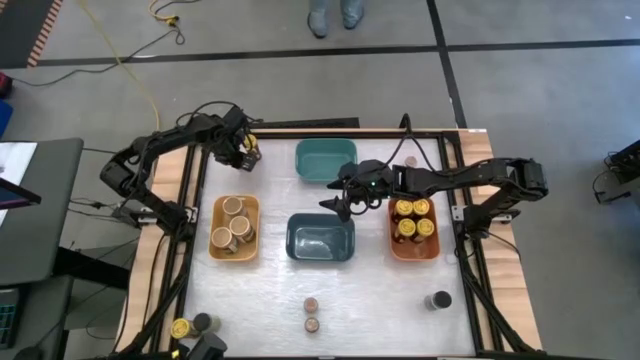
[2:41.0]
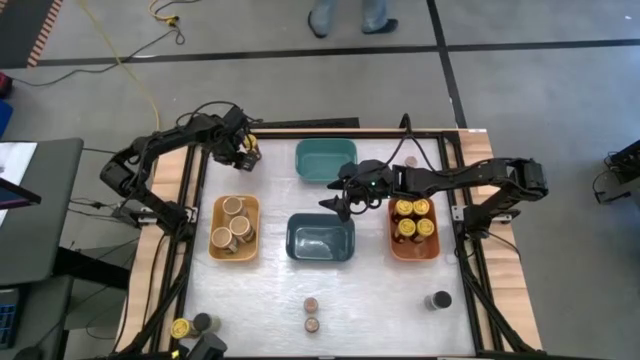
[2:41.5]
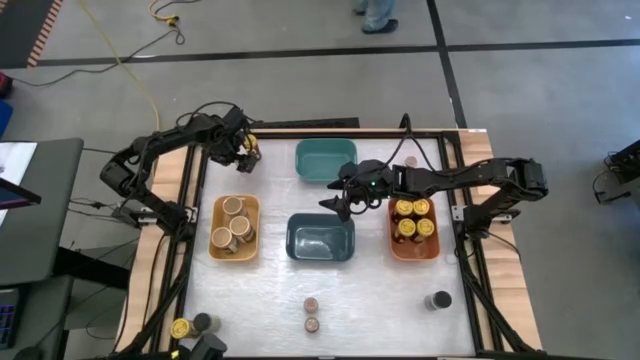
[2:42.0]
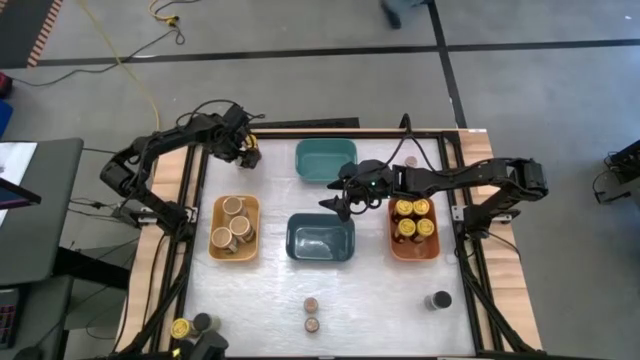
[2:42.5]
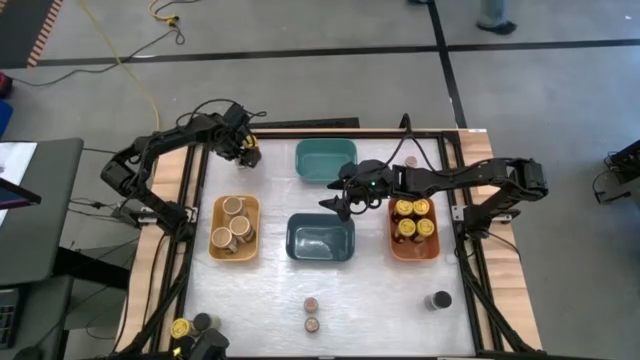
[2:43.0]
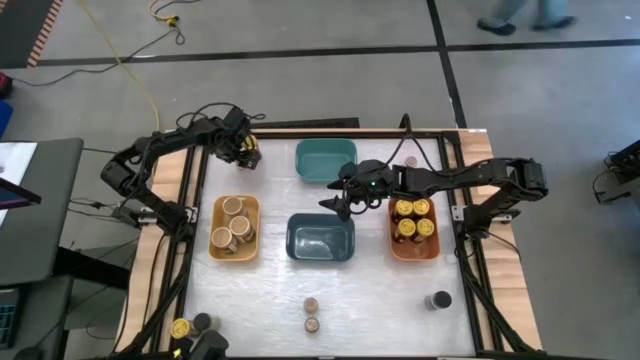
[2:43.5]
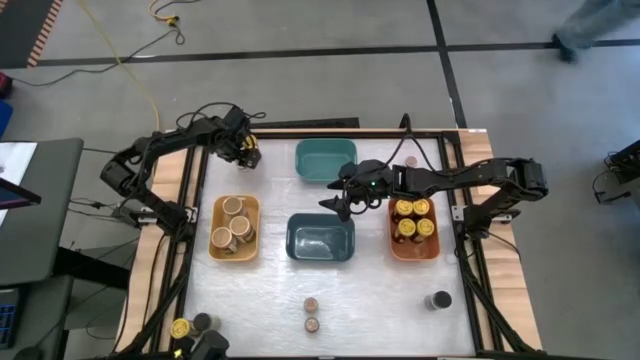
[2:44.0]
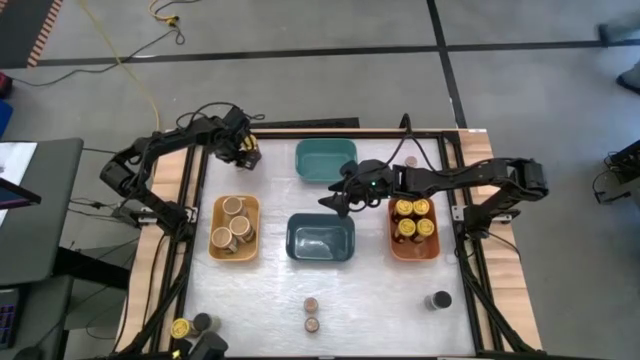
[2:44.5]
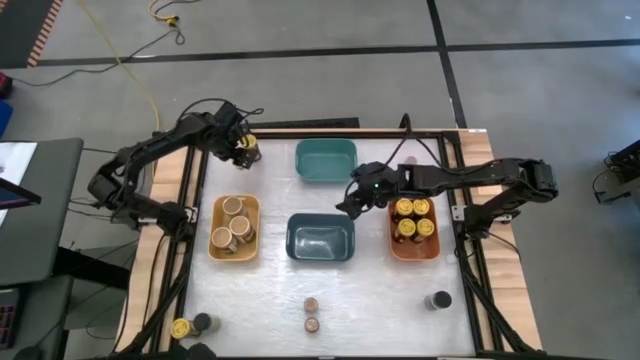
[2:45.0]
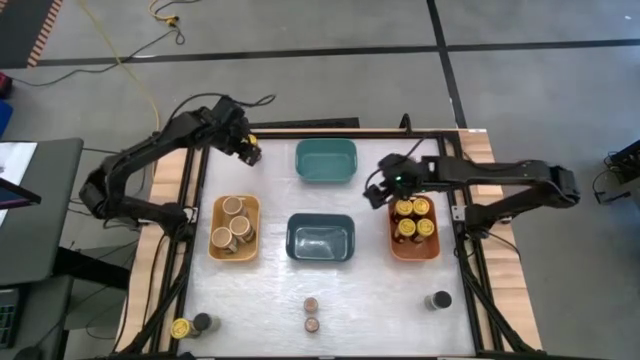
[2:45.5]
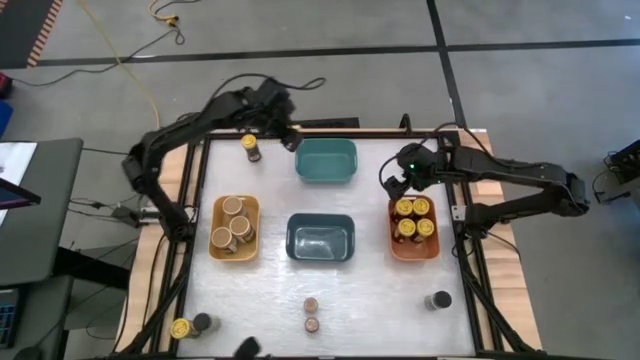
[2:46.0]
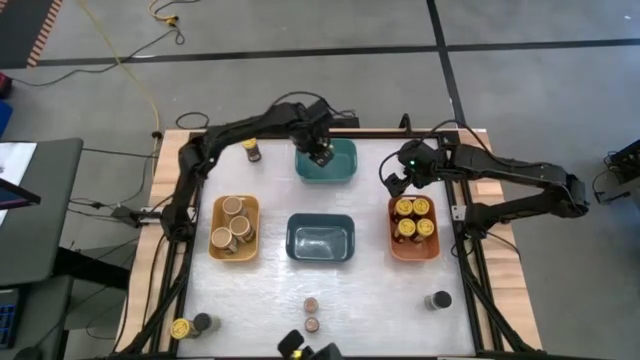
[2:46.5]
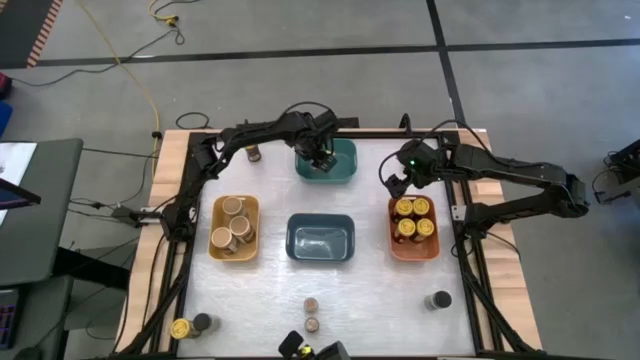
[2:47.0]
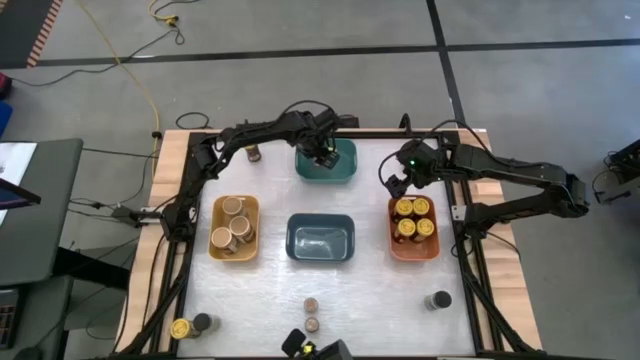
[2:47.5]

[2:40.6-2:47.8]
Task: Sort spices by type
Put the brown seasoning bottle into the green bin

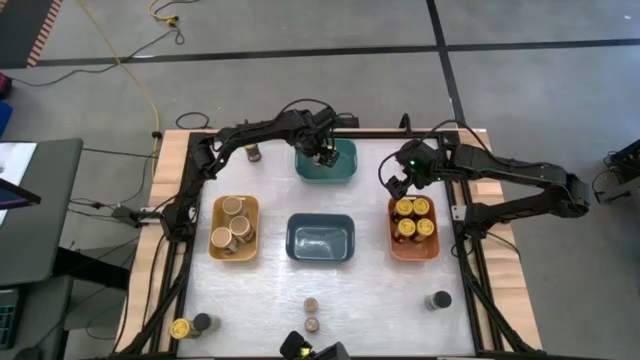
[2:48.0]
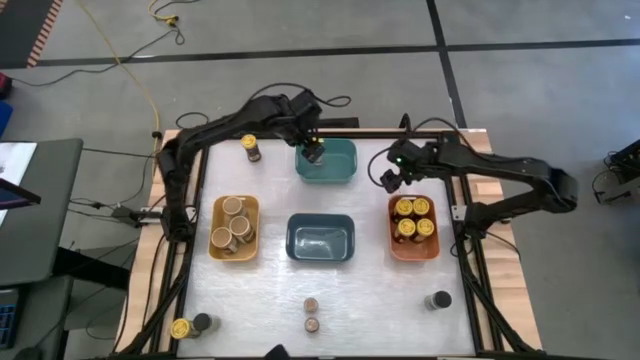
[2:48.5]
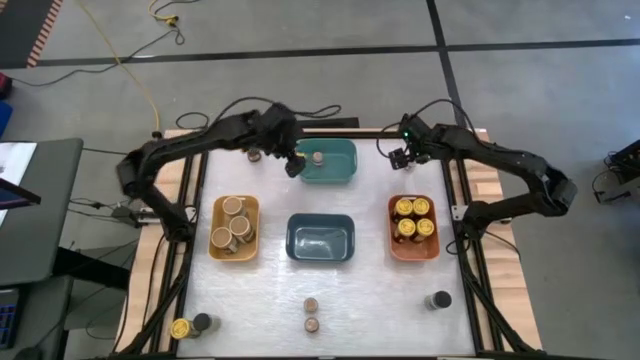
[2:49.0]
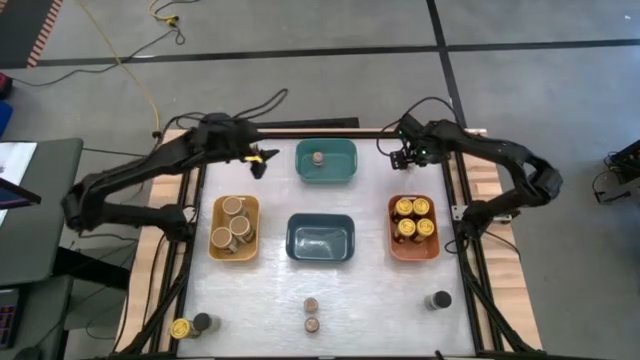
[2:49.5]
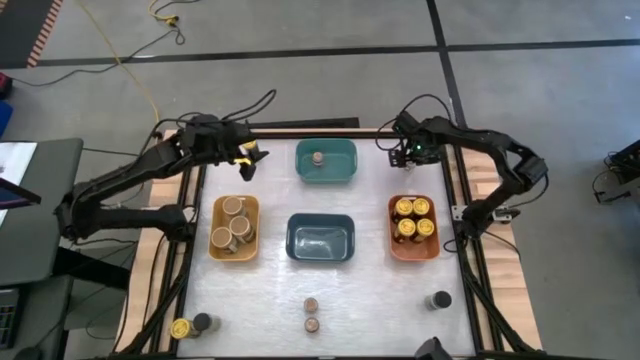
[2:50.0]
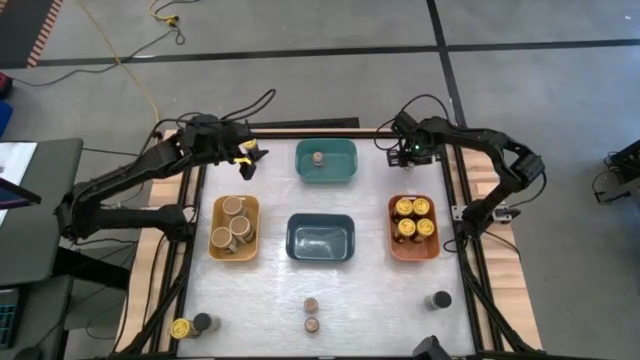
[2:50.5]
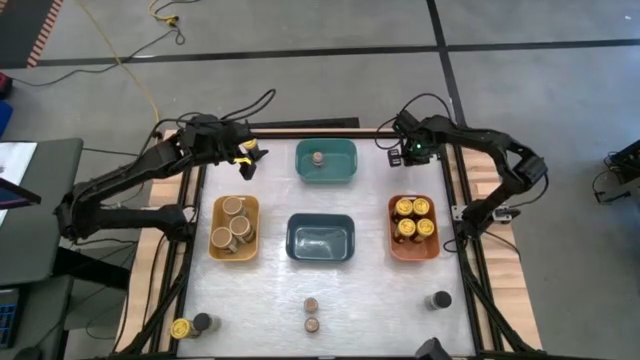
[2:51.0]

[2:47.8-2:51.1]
Put the brown seasoning bottle into the green bin

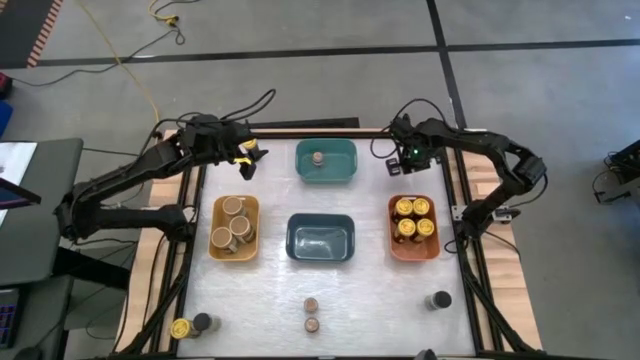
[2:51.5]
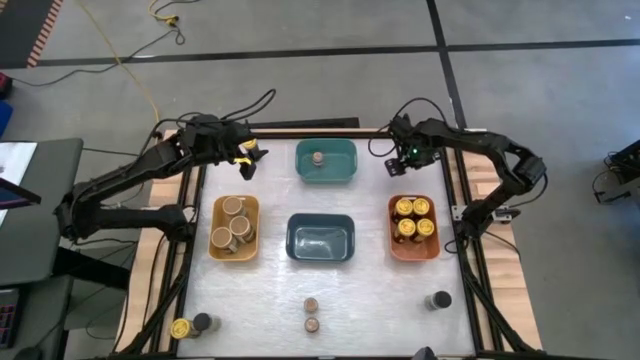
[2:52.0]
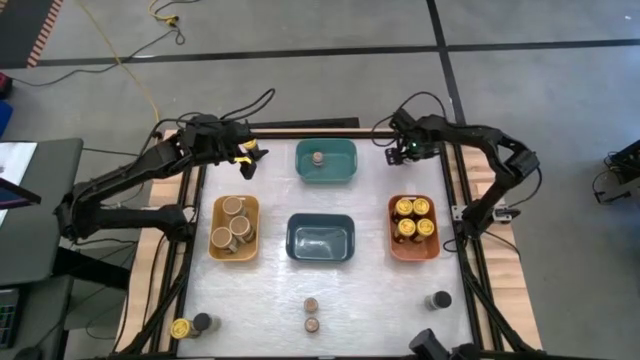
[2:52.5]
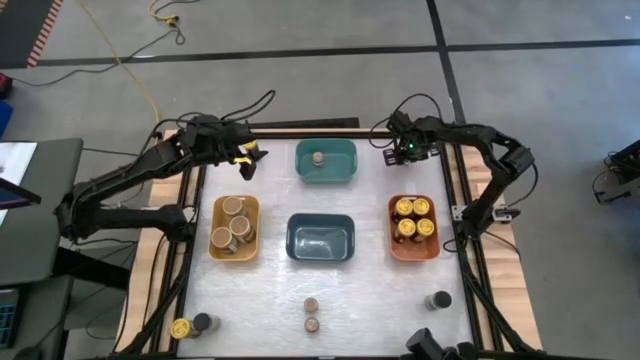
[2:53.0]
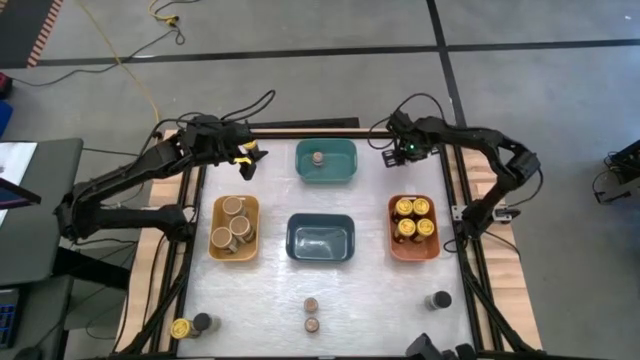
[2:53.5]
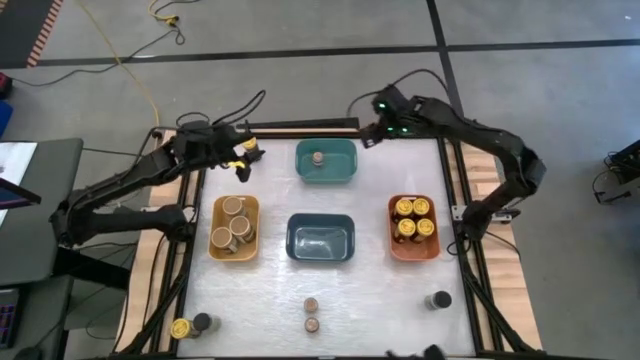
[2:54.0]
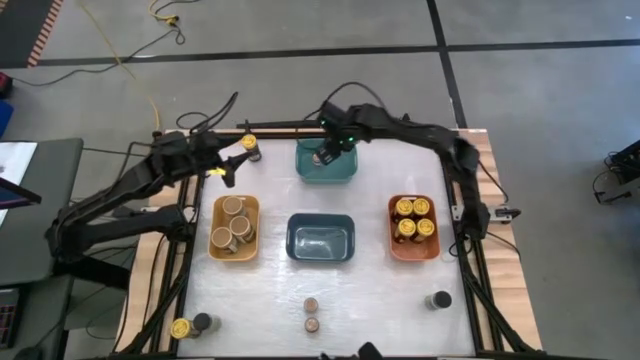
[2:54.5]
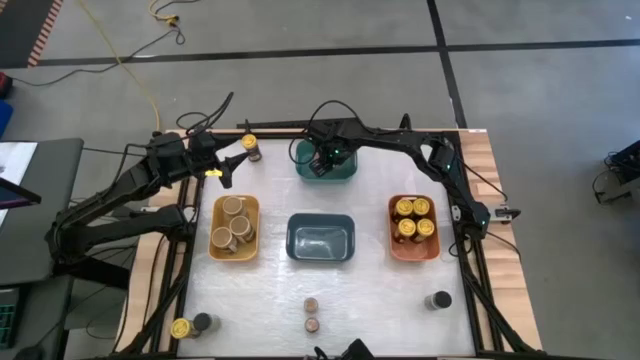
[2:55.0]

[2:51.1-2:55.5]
Put the brown seasoning bottle into the green bin

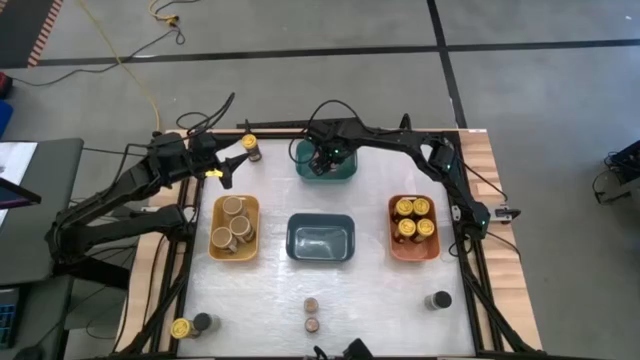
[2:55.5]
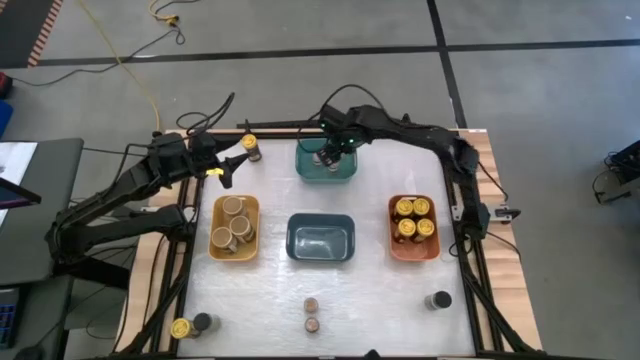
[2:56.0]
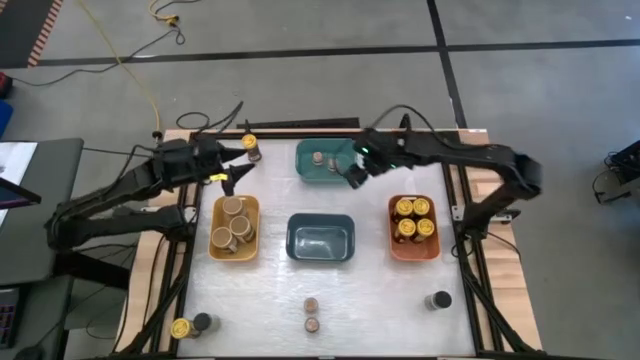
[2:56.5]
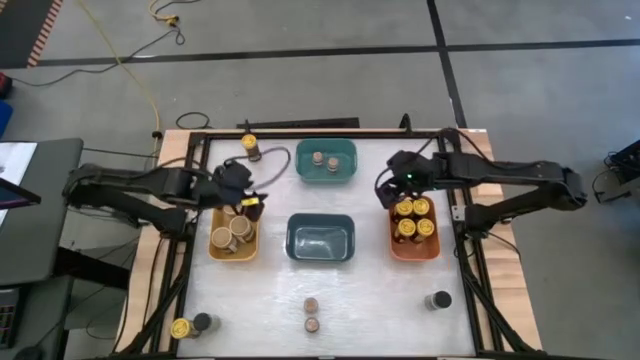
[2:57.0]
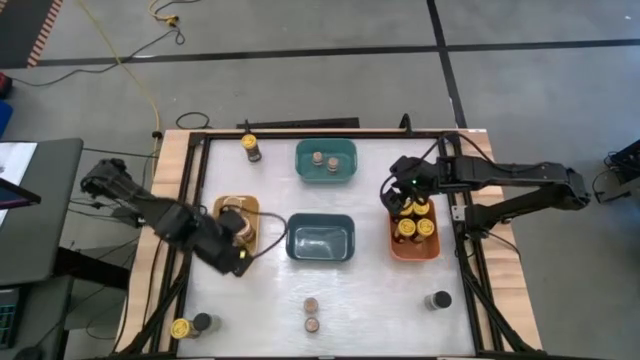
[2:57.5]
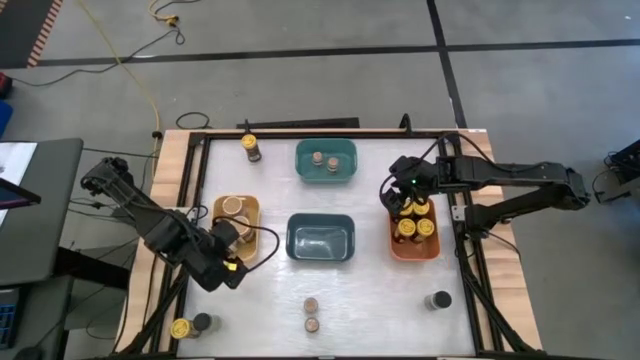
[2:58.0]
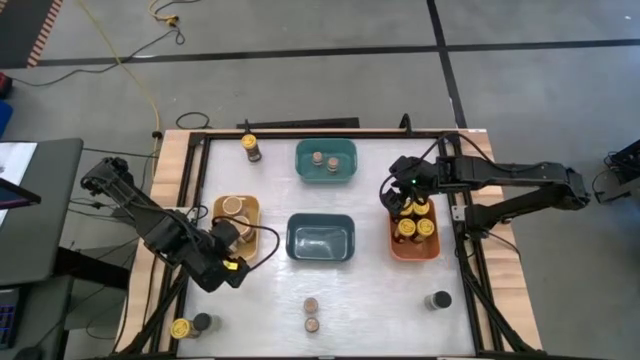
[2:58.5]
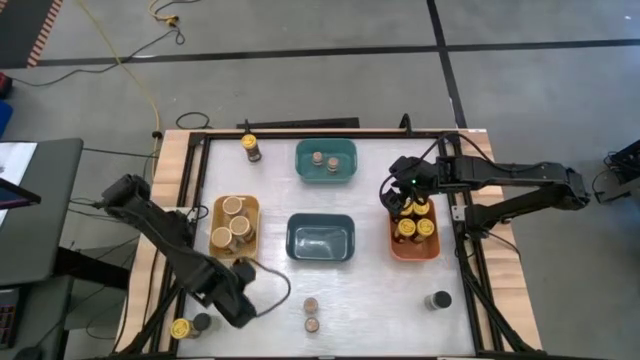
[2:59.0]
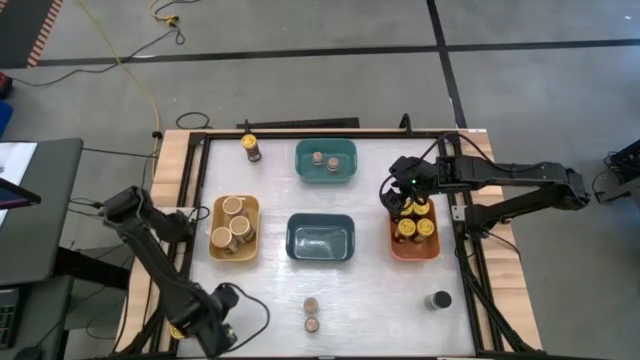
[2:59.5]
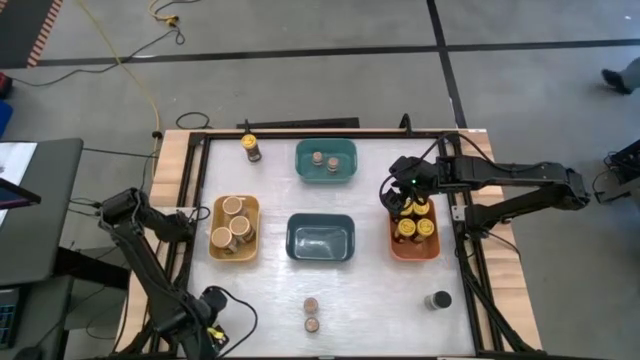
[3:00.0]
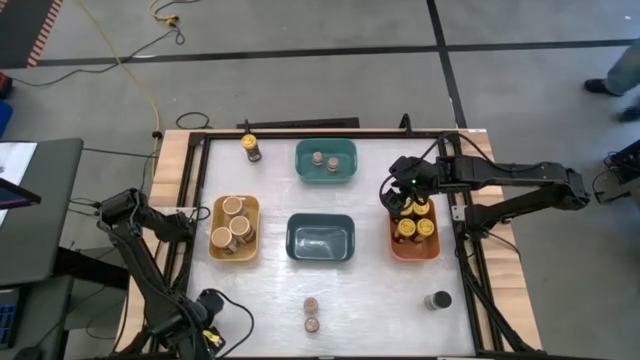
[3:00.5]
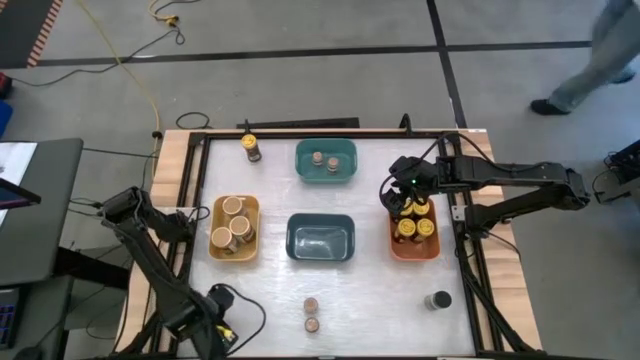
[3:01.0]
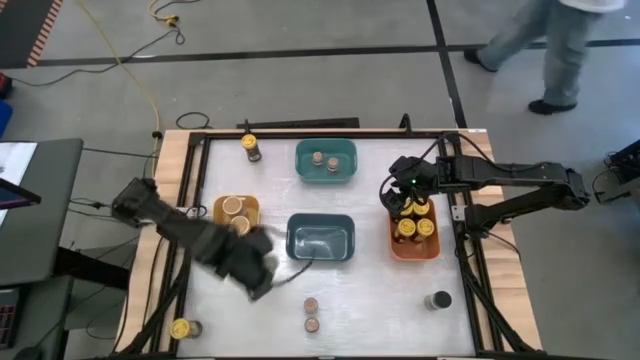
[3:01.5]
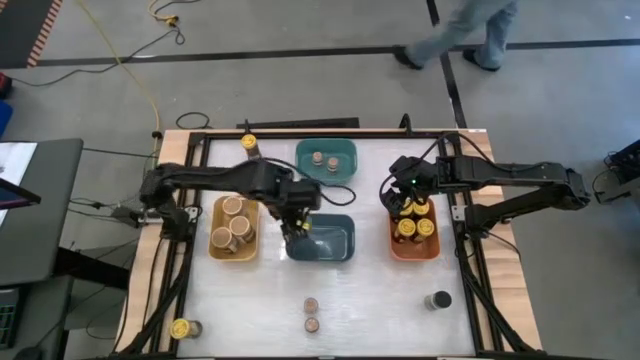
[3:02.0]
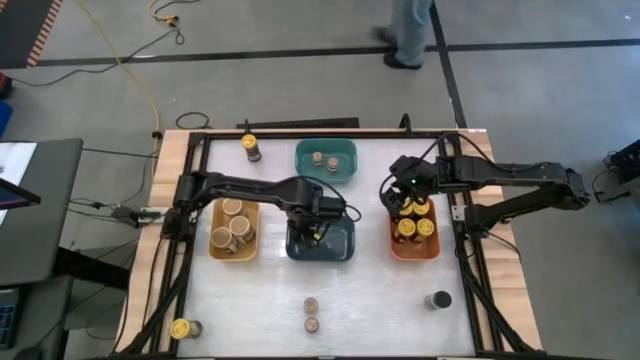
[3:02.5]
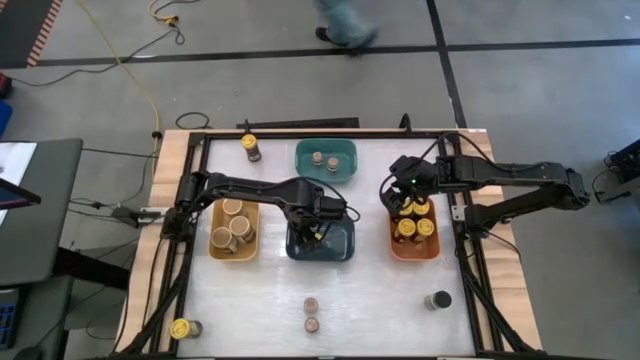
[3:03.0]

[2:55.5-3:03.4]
Put the black seasoning bottle into the blue bin
